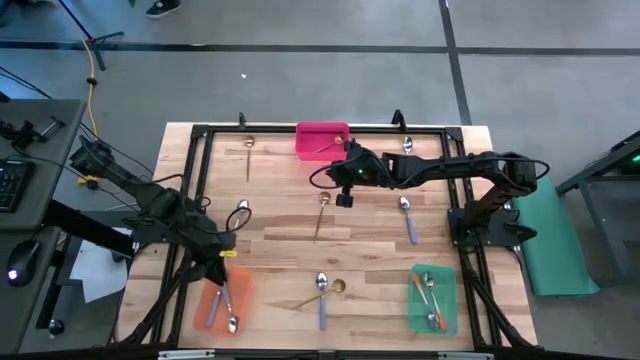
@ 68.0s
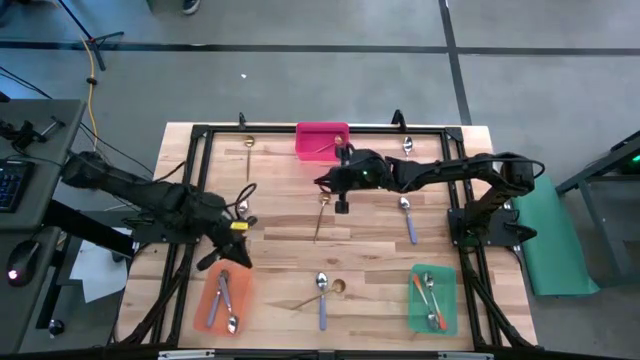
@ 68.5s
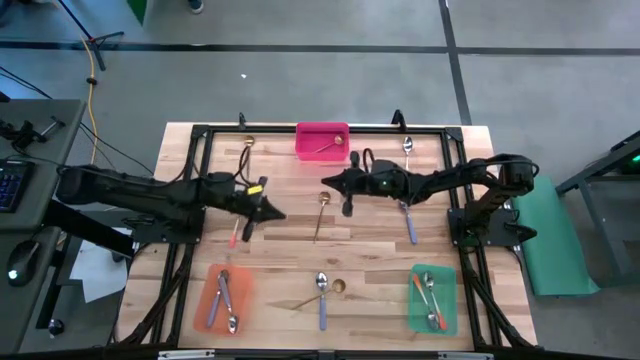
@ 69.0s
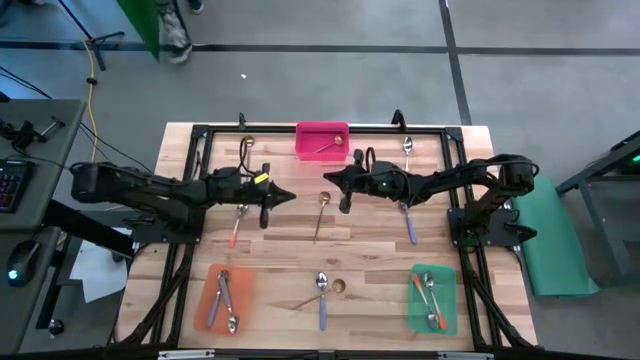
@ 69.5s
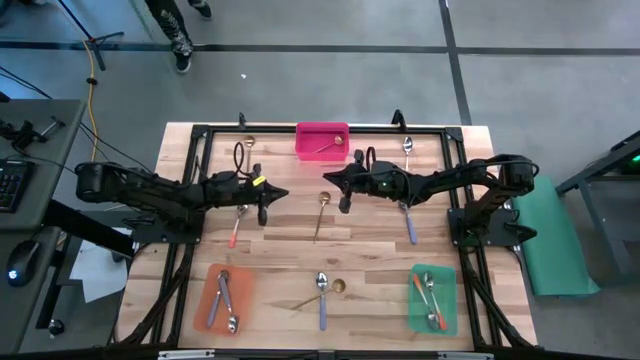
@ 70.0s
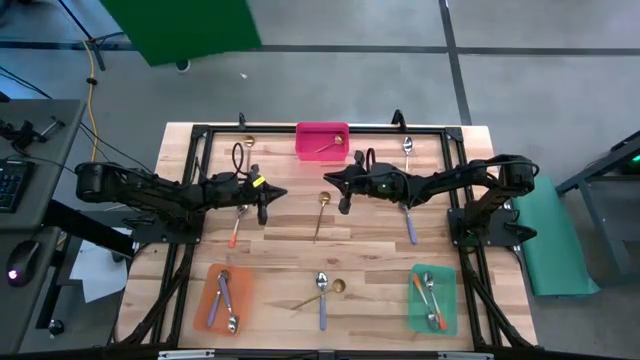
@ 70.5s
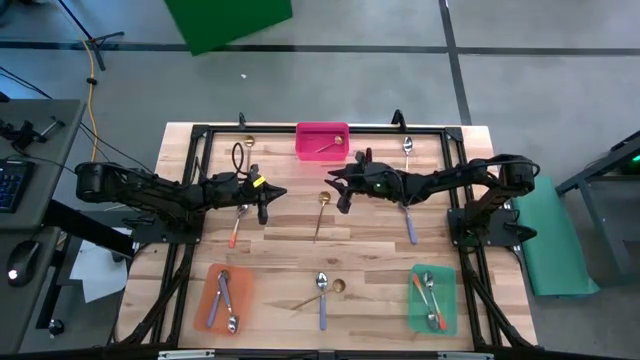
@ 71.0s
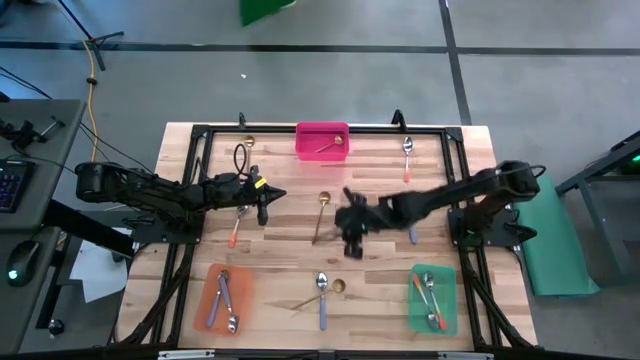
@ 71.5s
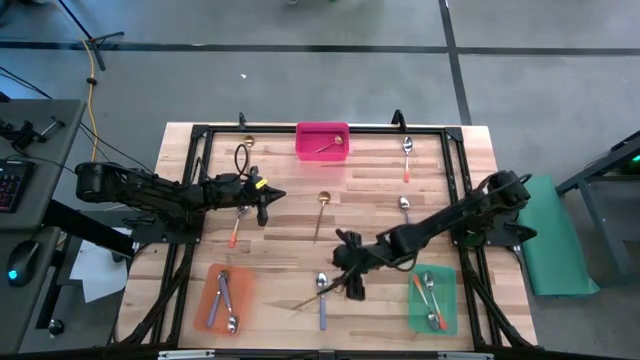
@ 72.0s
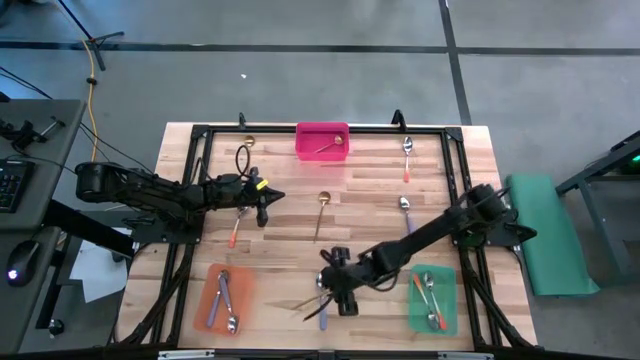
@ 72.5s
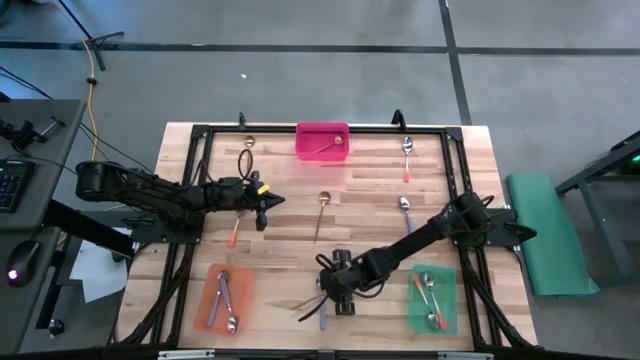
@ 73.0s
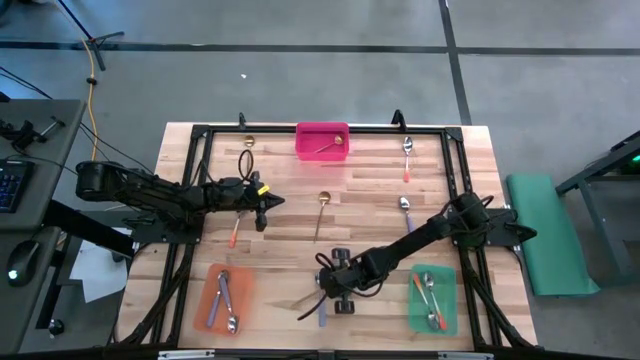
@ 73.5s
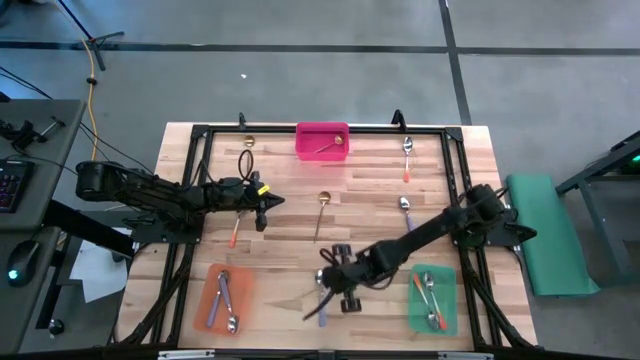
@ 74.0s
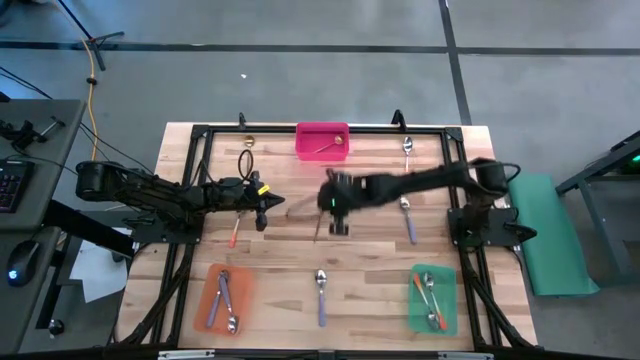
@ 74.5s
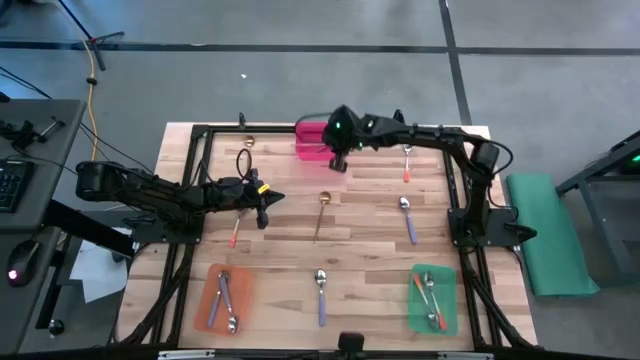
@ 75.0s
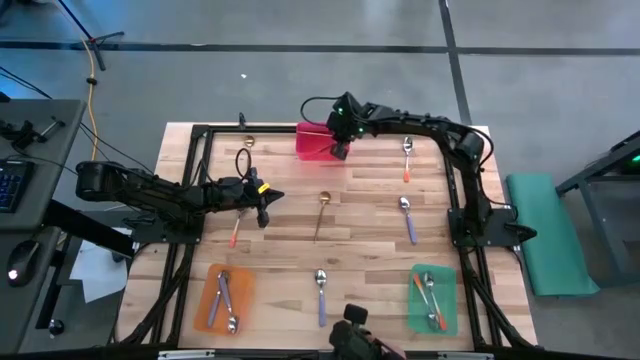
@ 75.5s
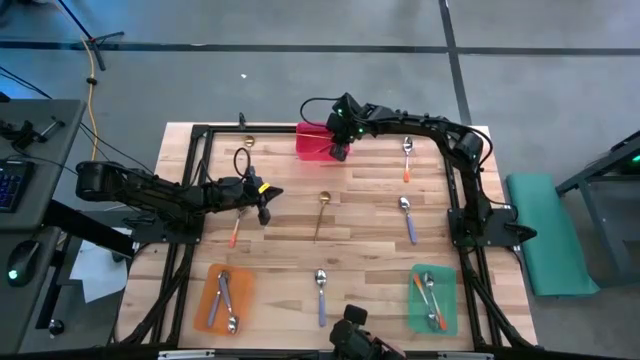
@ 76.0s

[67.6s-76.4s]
Task: Sort silverware by color (type)
Put the gold spoon into the red bin

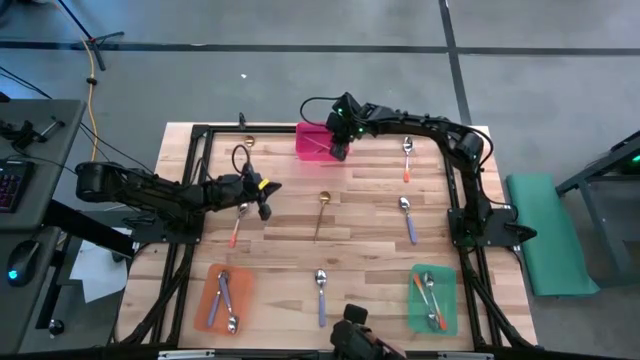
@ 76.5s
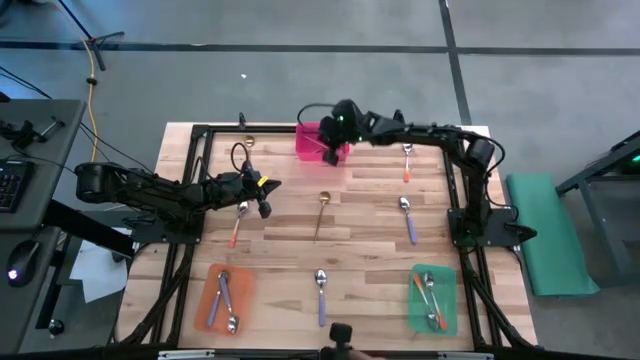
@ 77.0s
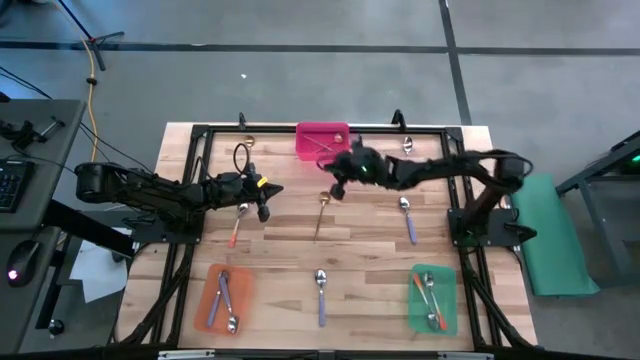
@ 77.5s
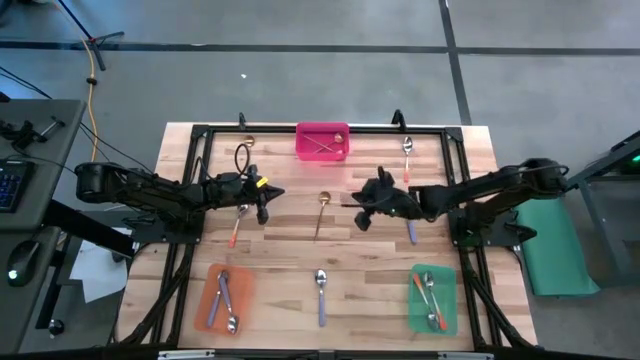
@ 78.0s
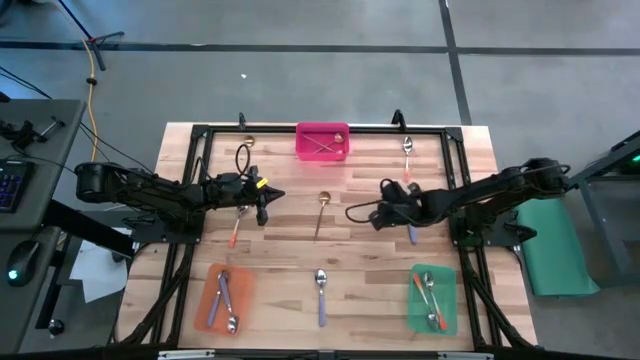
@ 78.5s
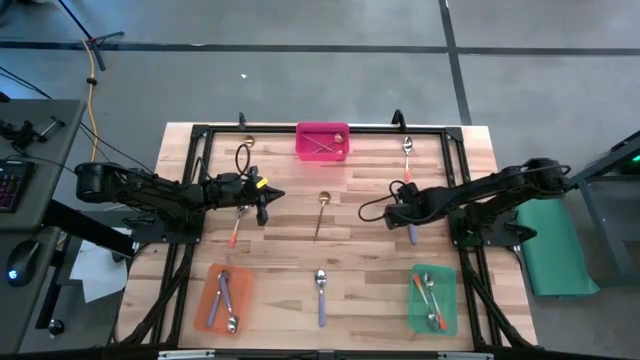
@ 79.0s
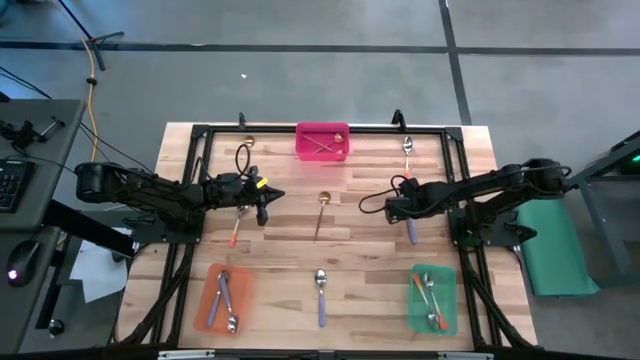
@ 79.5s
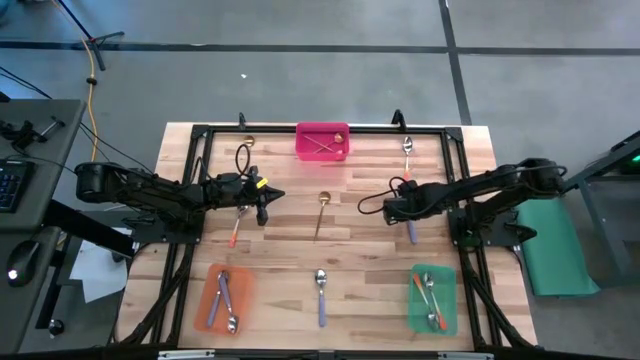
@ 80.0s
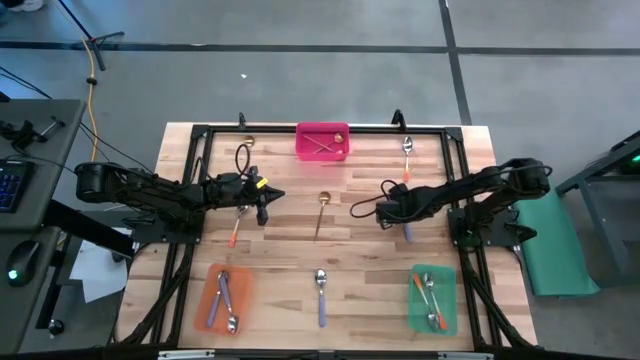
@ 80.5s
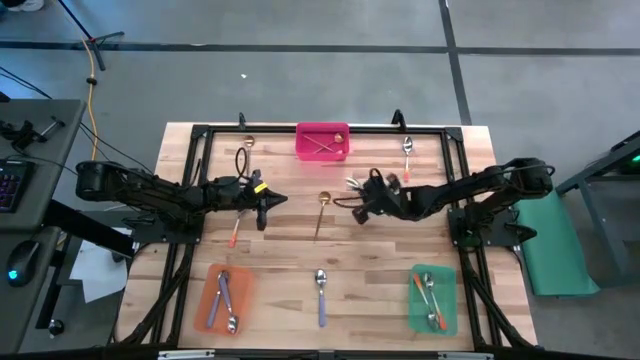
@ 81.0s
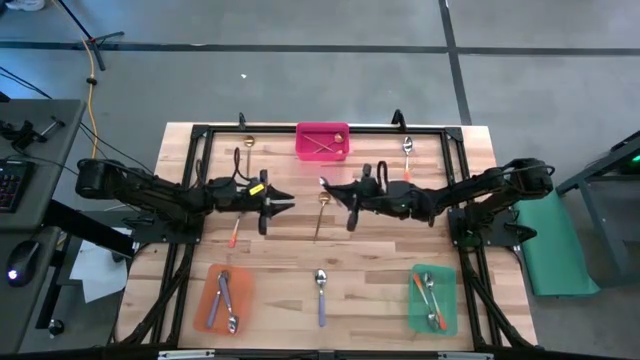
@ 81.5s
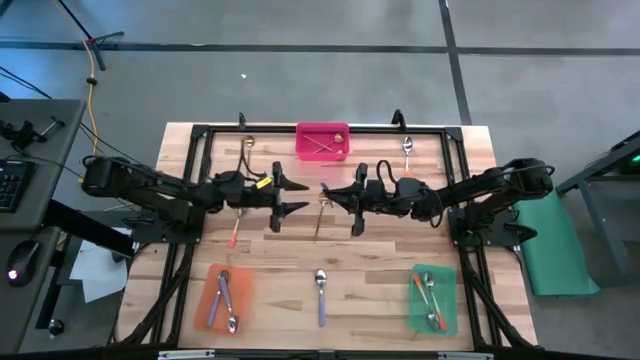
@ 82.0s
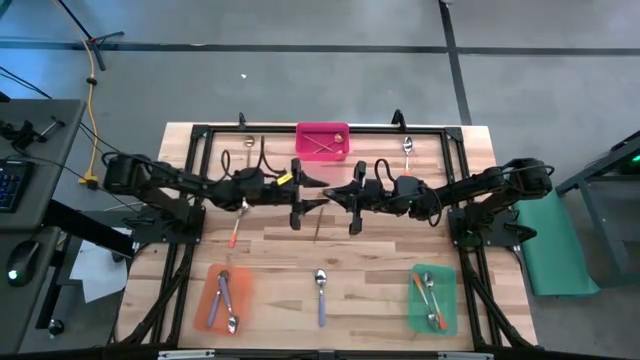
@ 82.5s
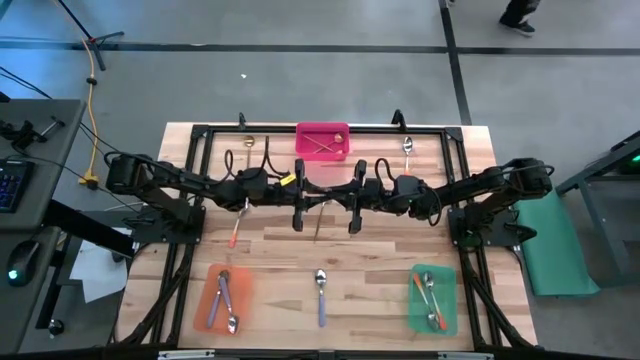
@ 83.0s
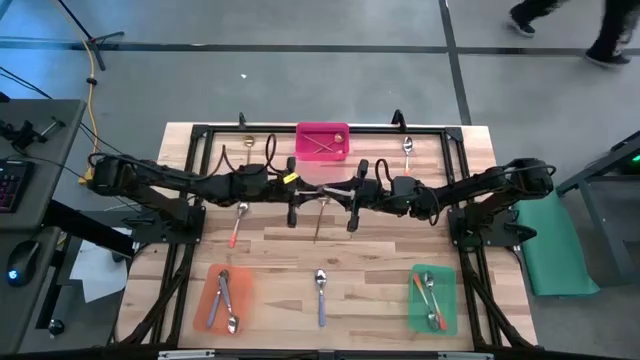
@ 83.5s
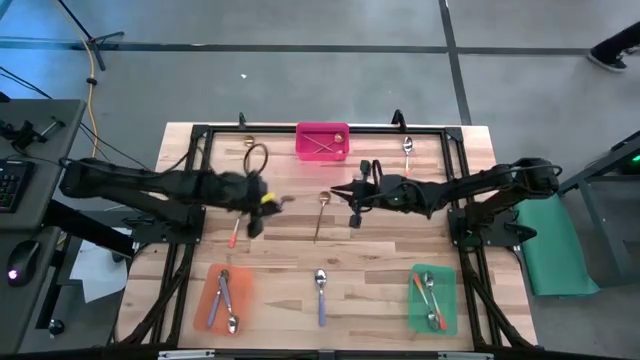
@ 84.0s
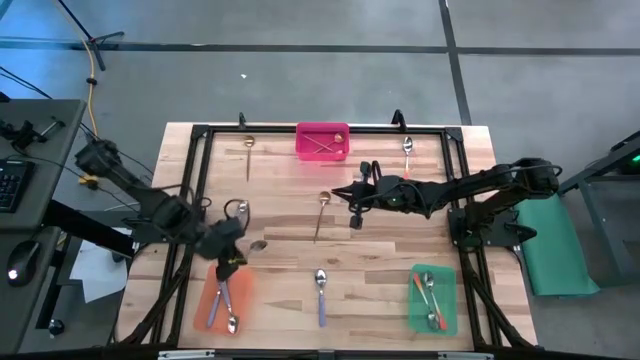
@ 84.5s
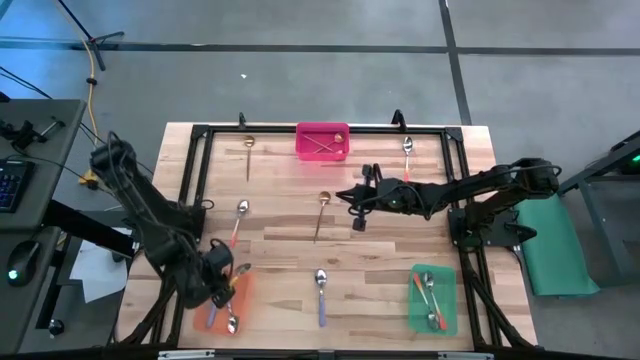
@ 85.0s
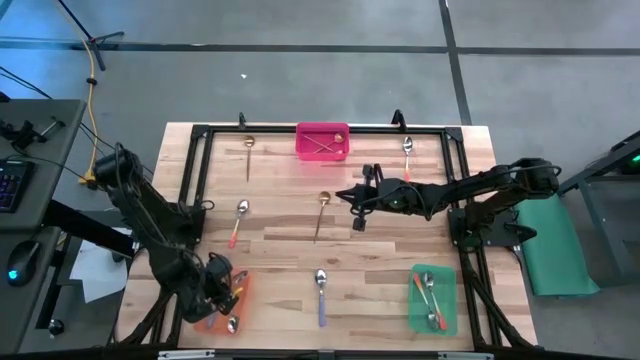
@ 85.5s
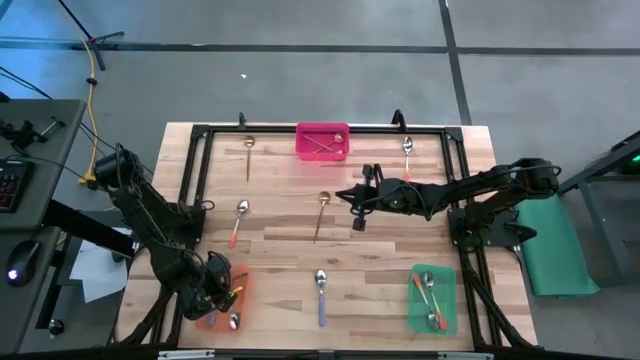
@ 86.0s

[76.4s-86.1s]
Put the purple spoon into the orange bin

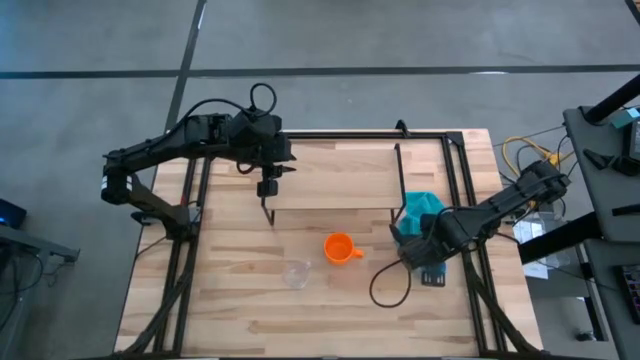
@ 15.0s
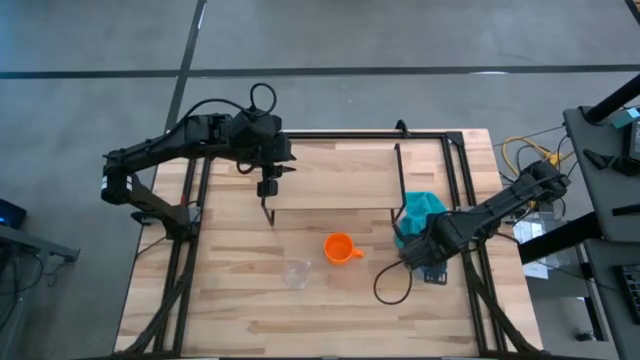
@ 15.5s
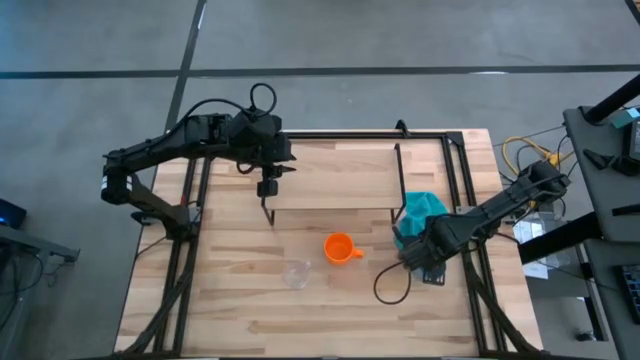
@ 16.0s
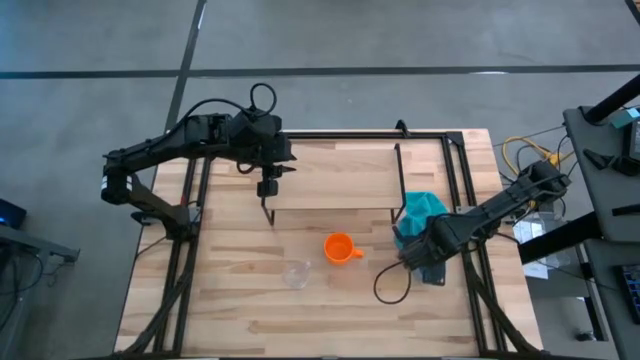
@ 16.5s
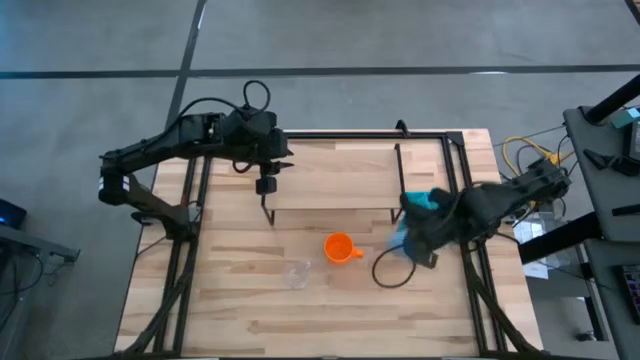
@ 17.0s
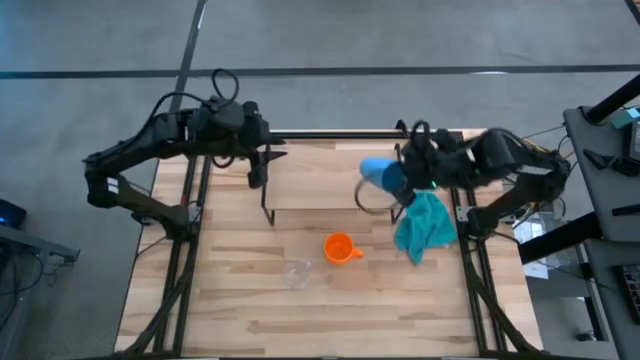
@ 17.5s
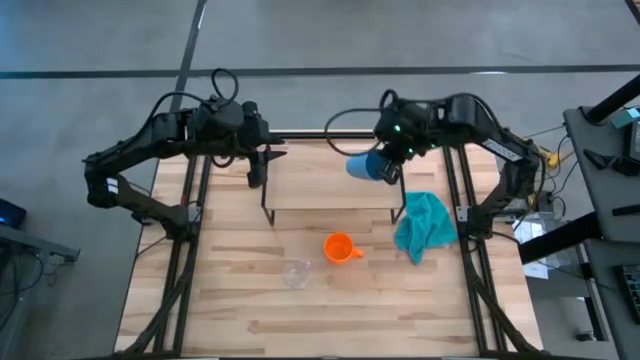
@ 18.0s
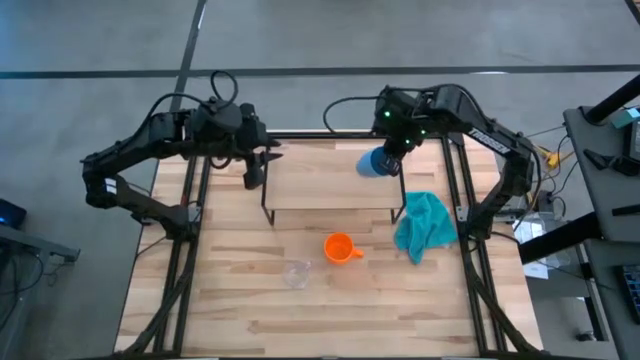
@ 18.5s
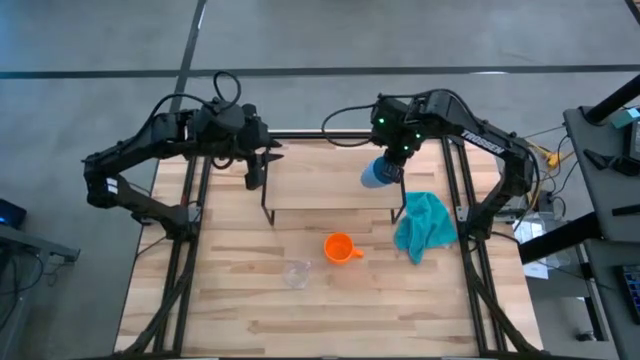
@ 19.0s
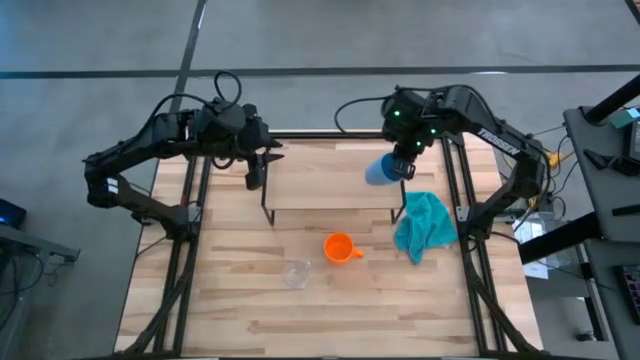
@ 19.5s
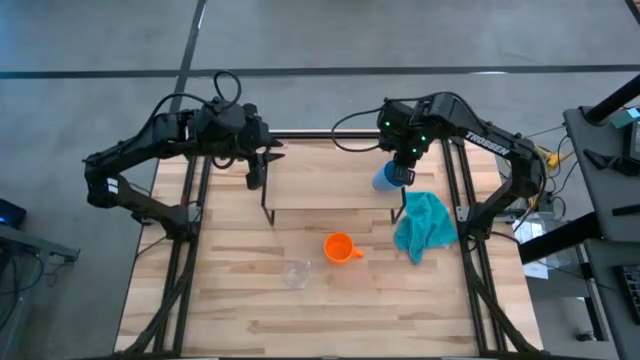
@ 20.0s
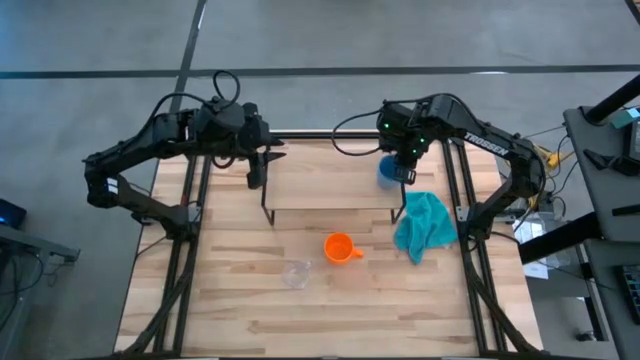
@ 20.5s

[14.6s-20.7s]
Task: Stack small to large cups/mugs on shelf
Put the blue cup onto the shelf
